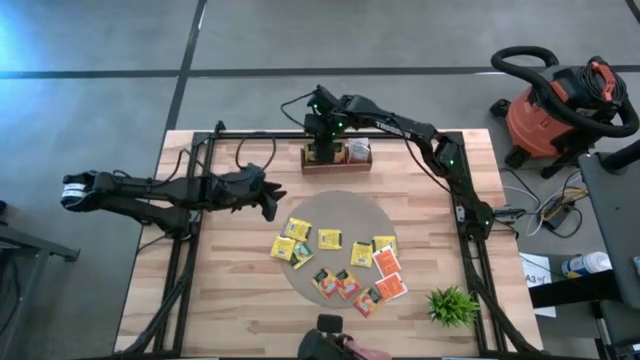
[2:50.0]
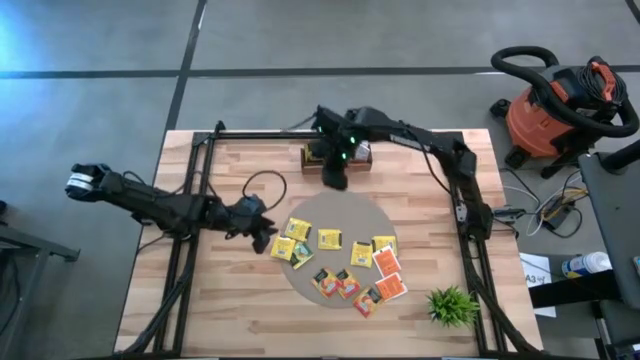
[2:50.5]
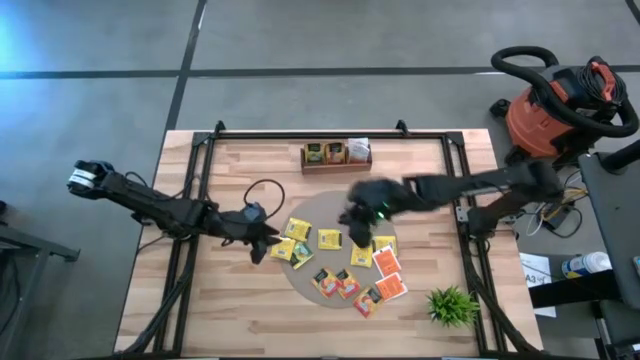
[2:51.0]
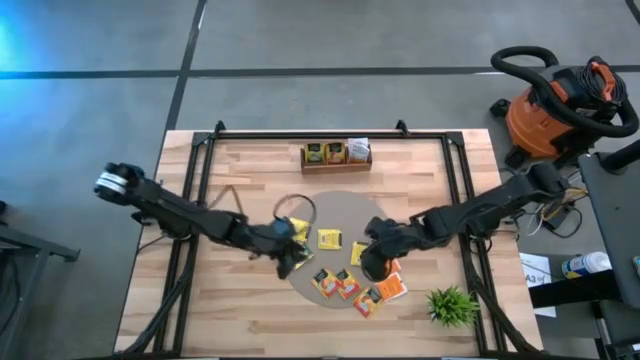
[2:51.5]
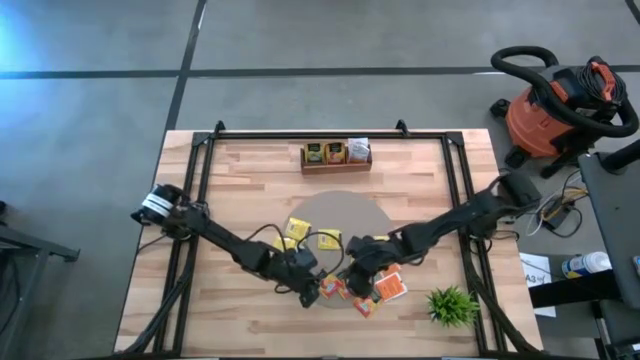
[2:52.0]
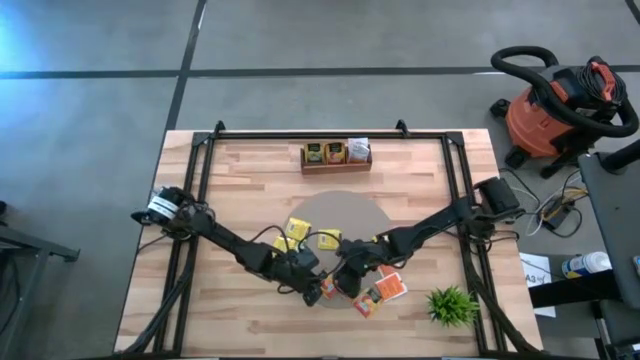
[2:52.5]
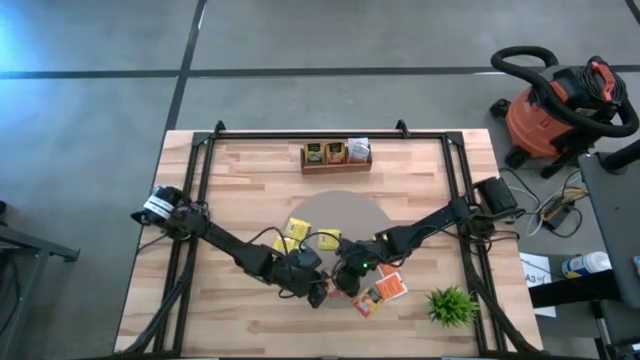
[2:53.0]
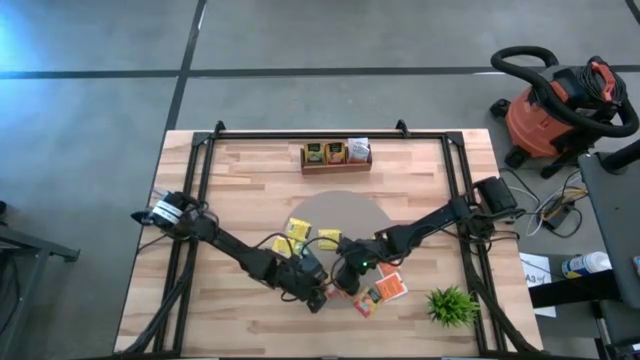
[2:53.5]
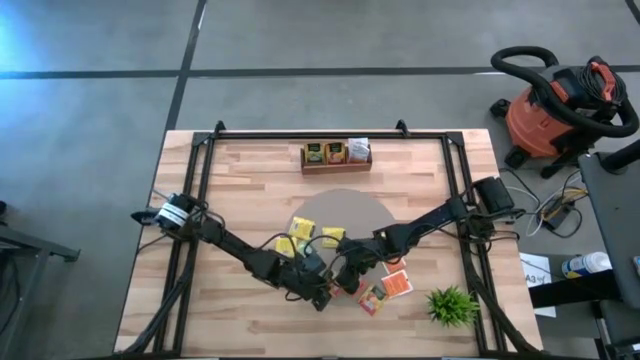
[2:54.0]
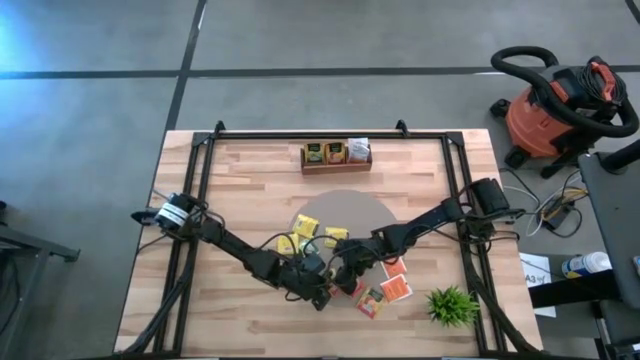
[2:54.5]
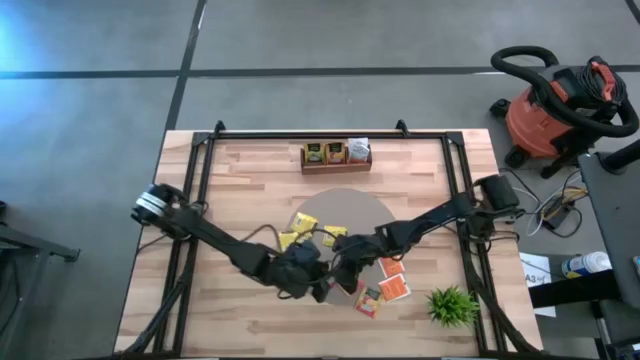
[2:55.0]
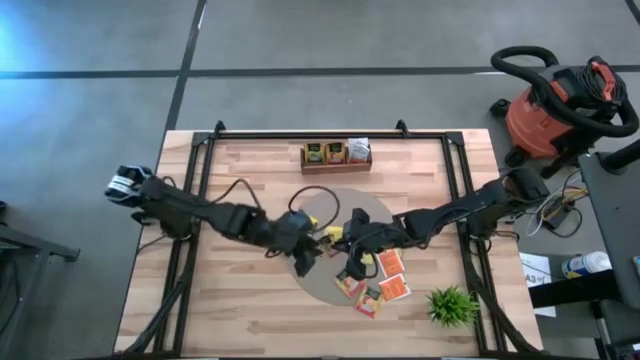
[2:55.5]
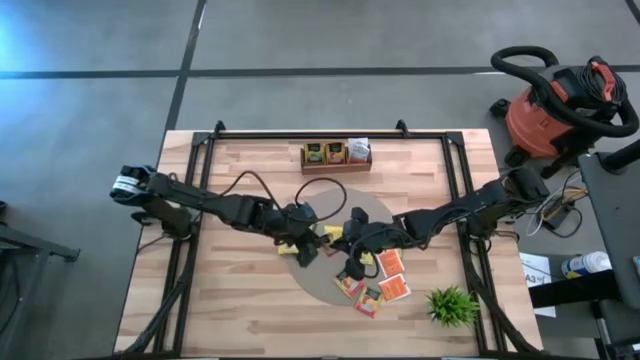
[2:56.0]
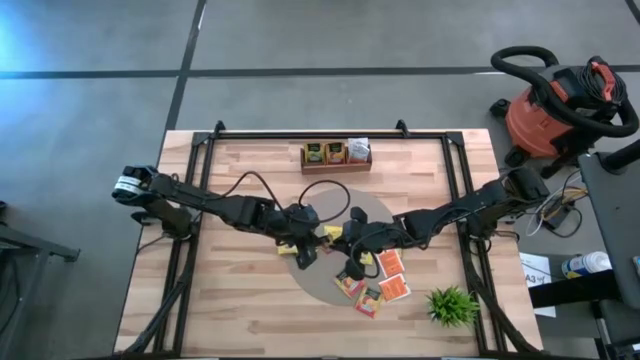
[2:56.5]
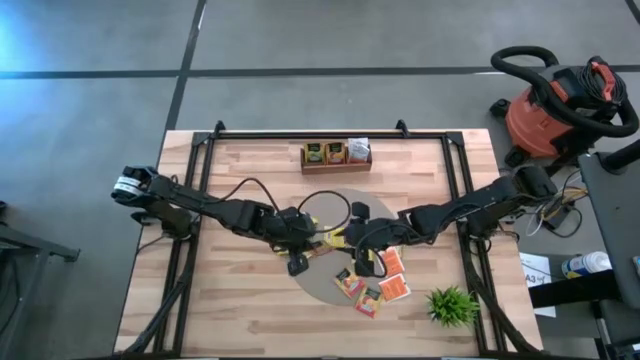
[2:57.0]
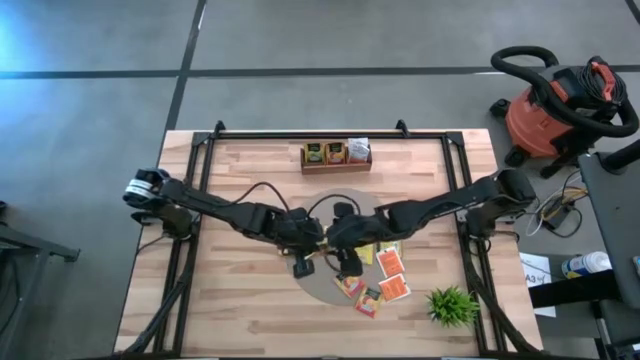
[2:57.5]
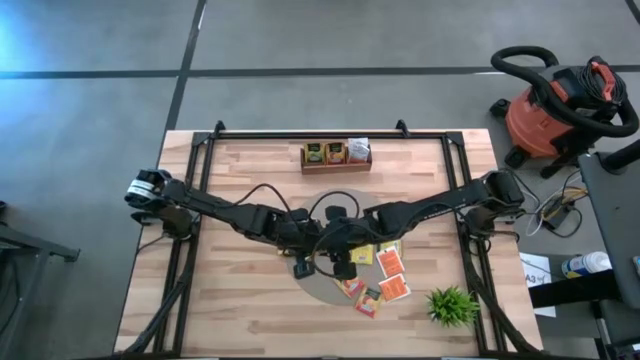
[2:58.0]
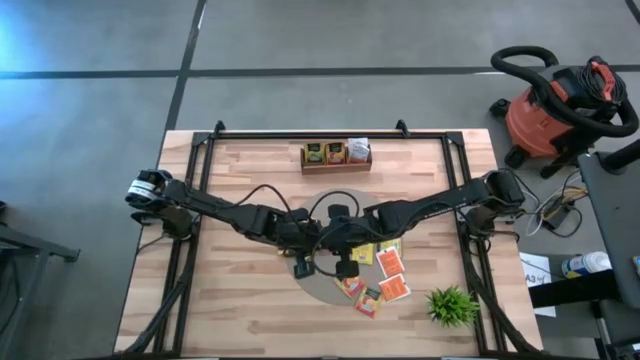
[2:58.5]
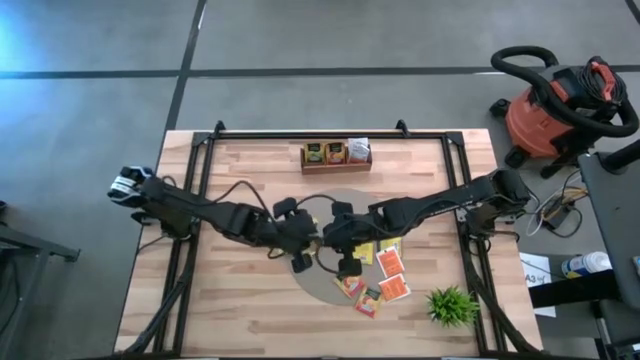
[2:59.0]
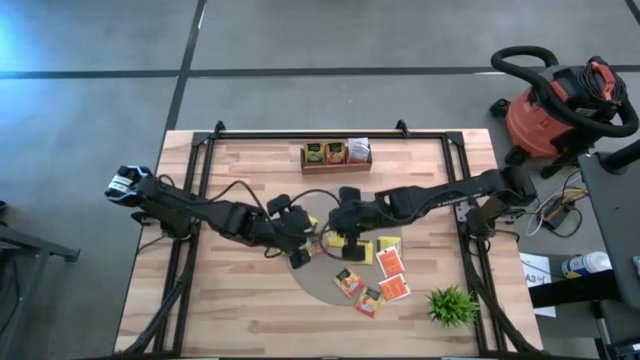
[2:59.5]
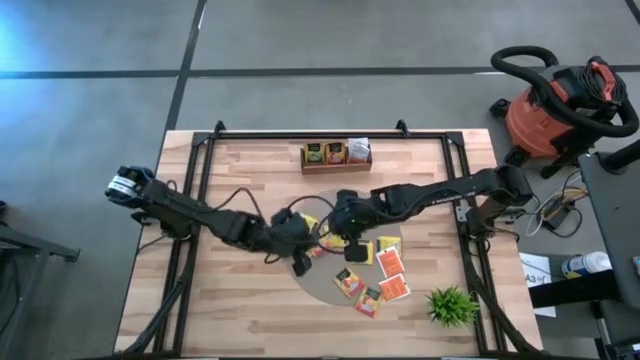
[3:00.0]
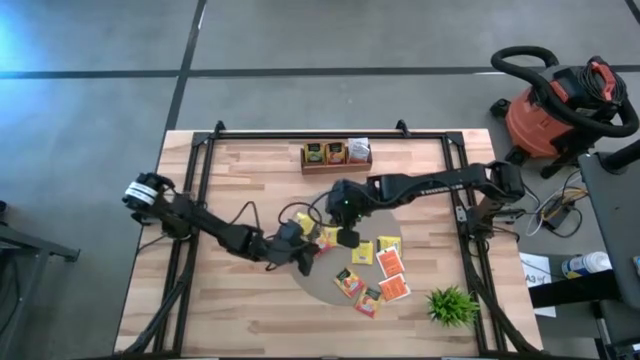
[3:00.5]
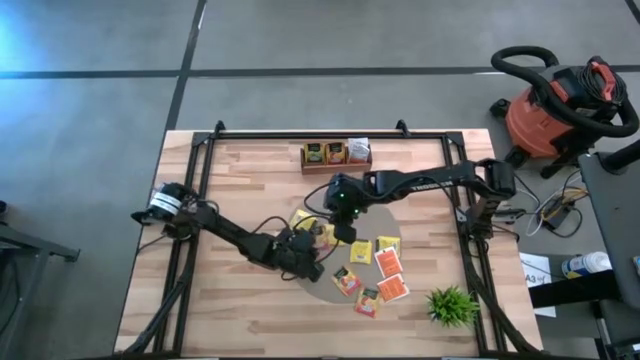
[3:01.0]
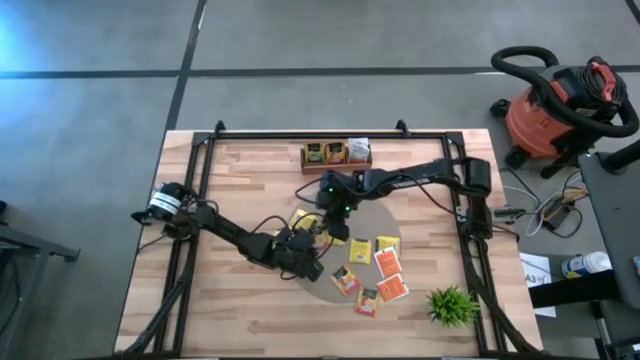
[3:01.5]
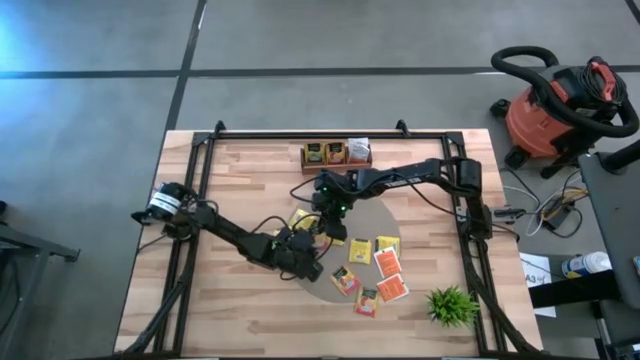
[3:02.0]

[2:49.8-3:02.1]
Task: Pick & Place Tea
Put the orange tea bag into the middle compartment of the wooden organizer

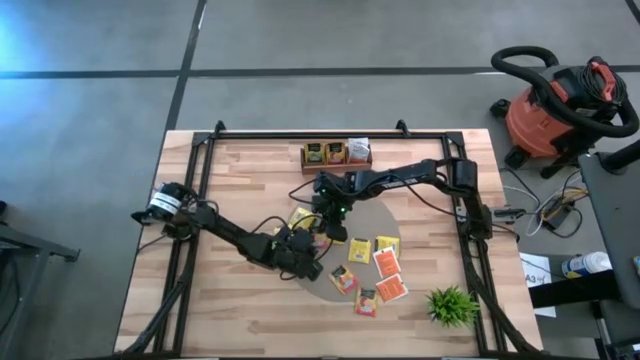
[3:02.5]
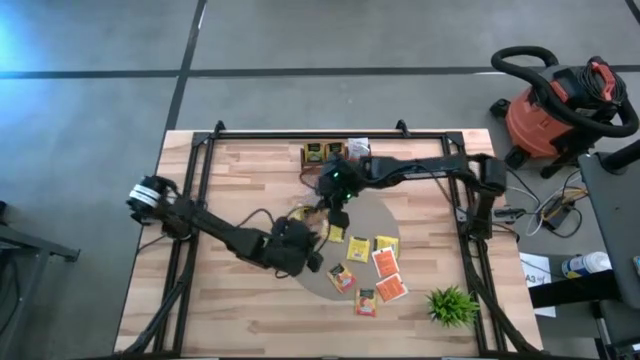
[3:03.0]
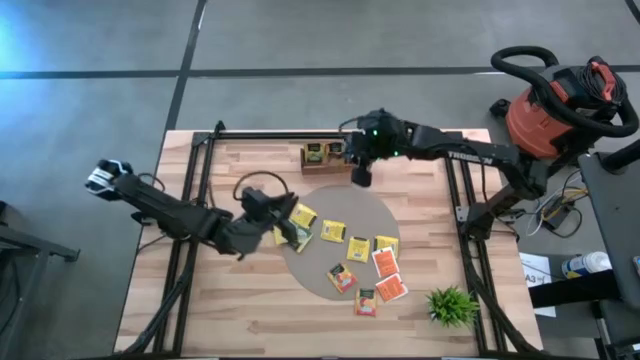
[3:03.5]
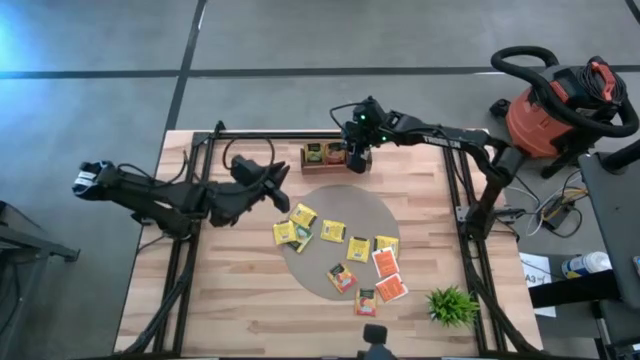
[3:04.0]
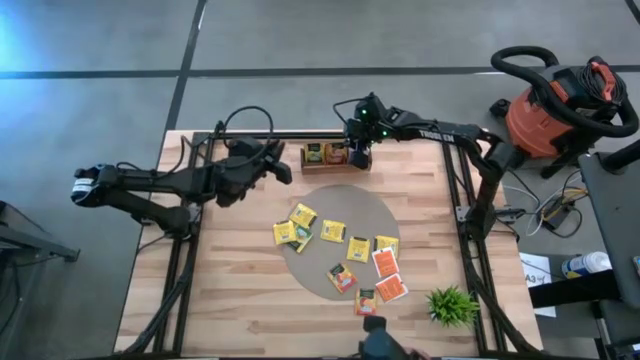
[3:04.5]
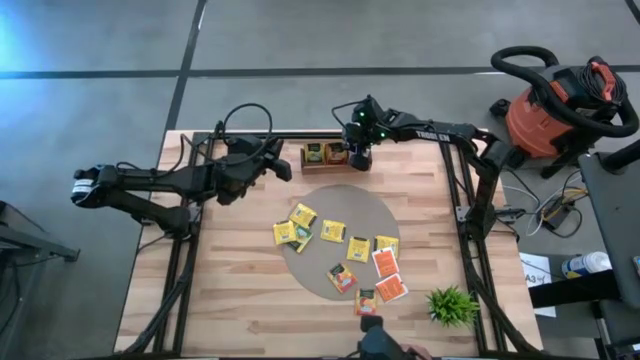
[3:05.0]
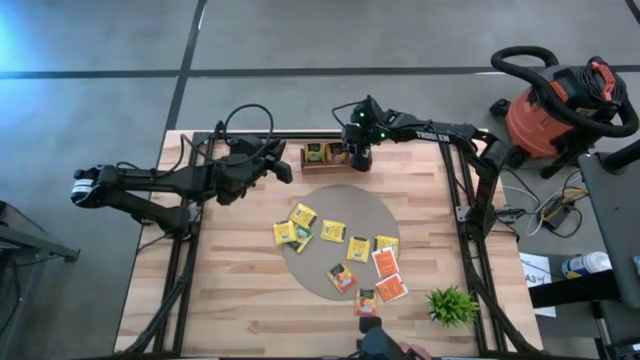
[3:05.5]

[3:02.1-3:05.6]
Put the top orange tea bag into the middle compartment of the wooden organizer

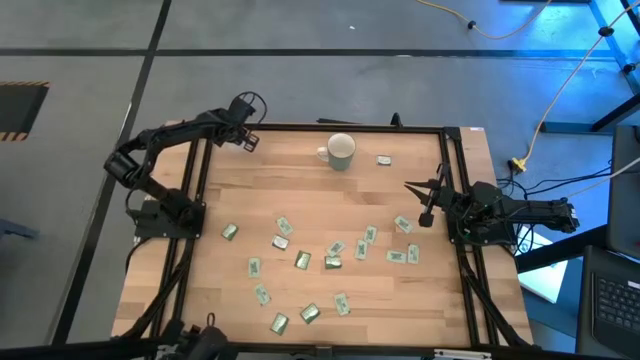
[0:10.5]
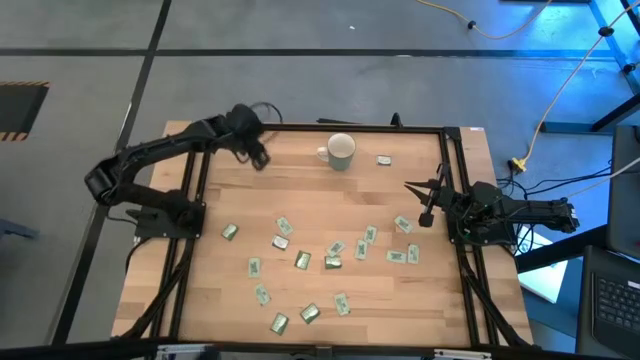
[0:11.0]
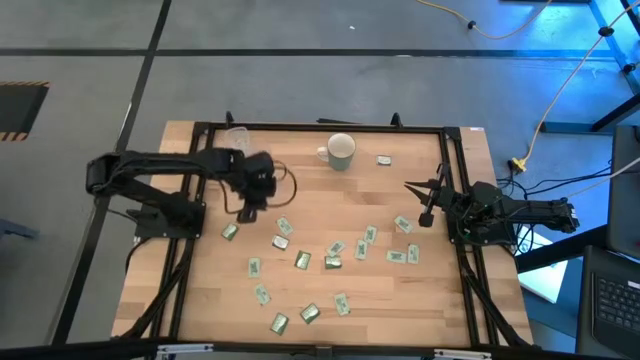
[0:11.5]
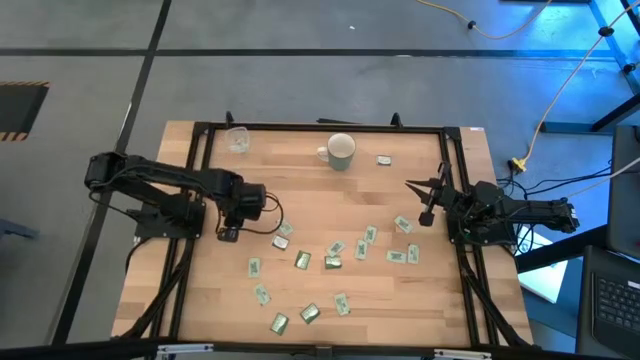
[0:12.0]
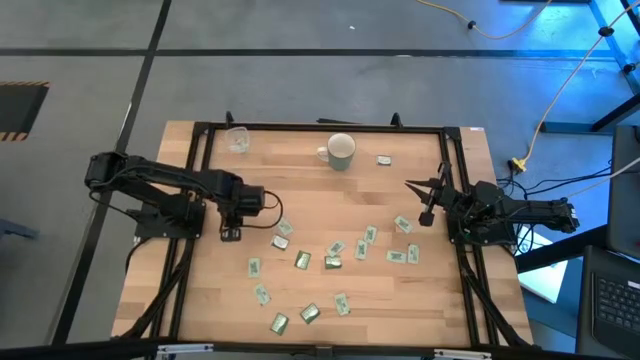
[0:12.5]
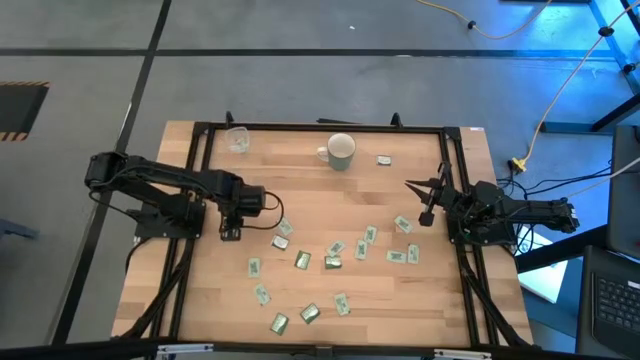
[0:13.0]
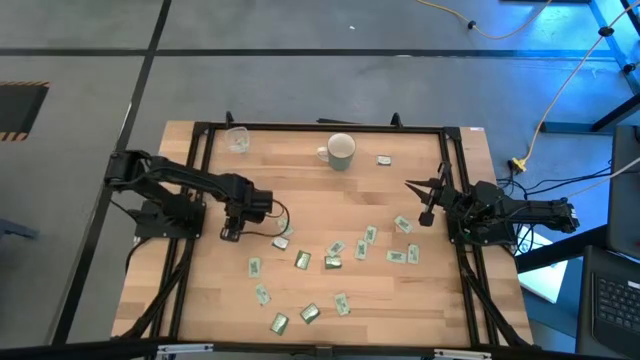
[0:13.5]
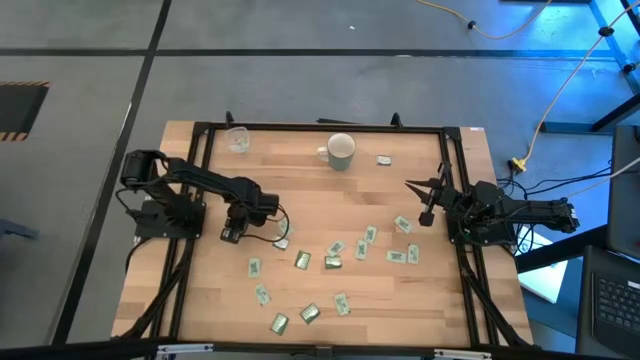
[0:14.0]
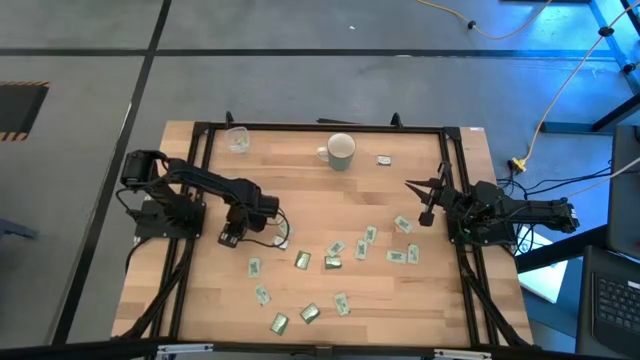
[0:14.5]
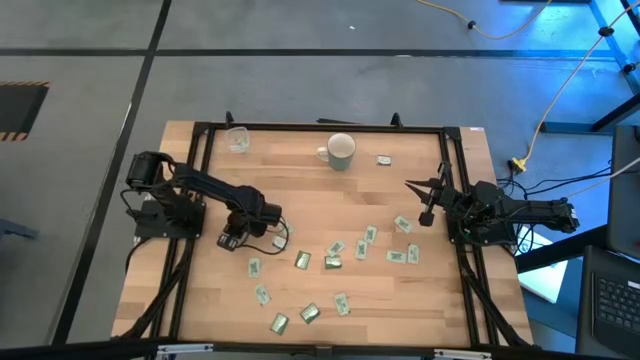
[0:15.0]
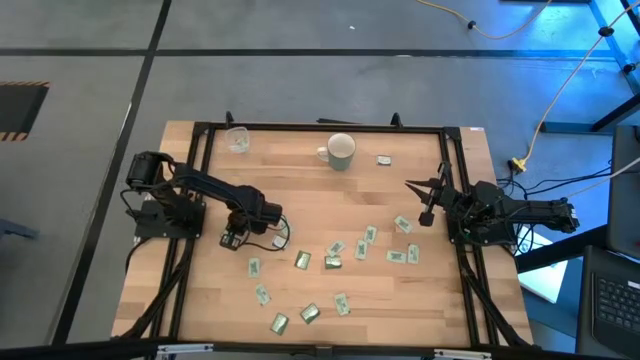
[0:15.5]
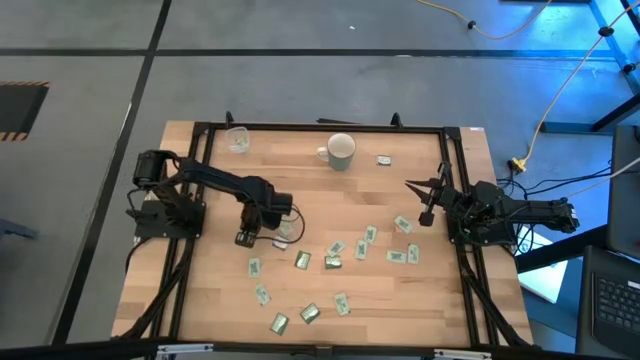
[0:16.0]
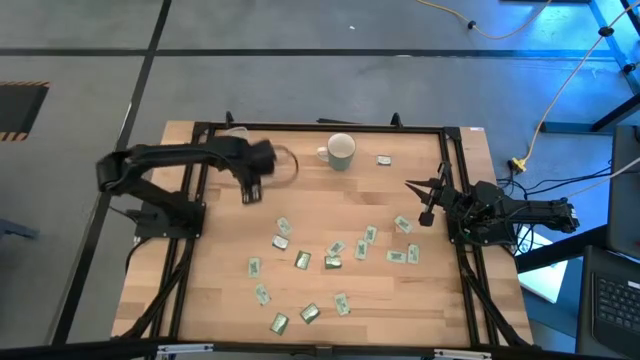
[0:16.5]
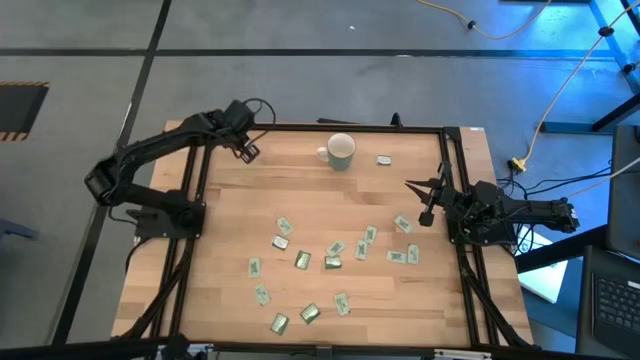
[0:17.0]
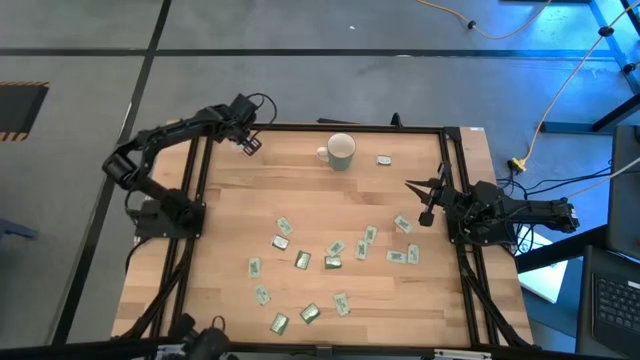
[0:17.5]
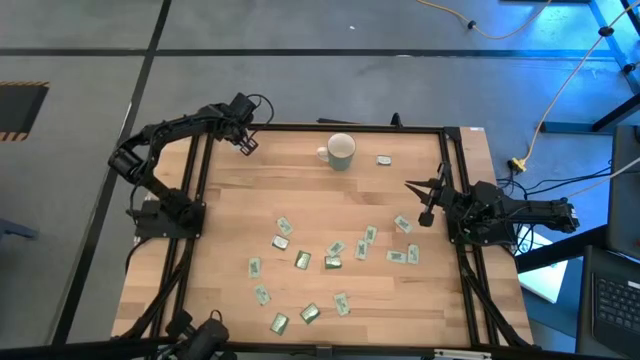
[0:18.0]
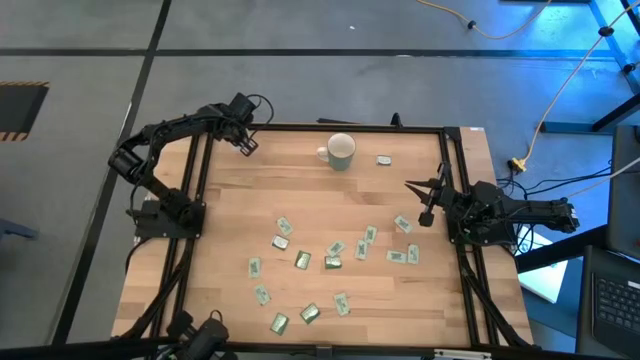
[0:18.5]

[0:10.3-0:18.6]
Task: Pick and place Stevia / Truvia into bins
Put the truvia packet into the transparent bin
